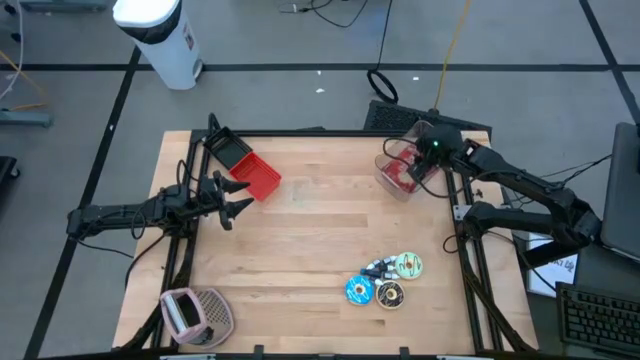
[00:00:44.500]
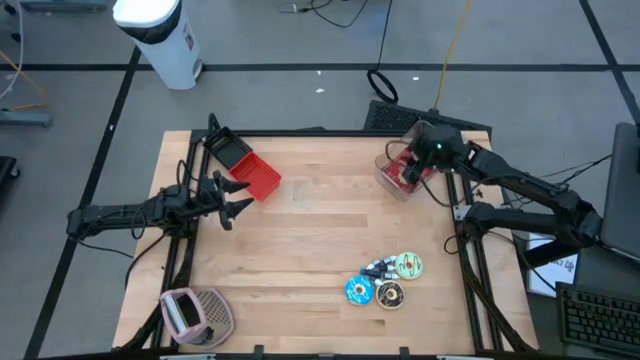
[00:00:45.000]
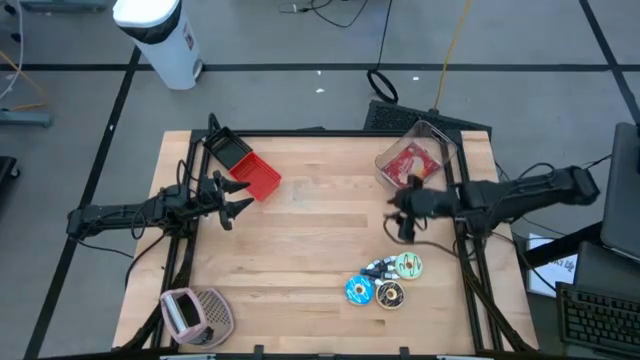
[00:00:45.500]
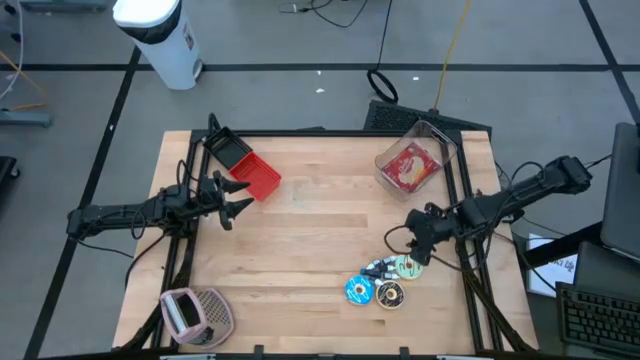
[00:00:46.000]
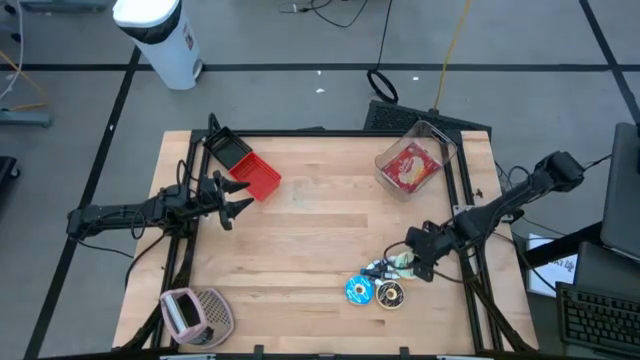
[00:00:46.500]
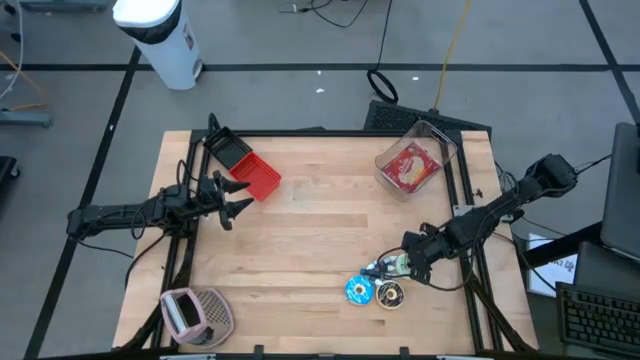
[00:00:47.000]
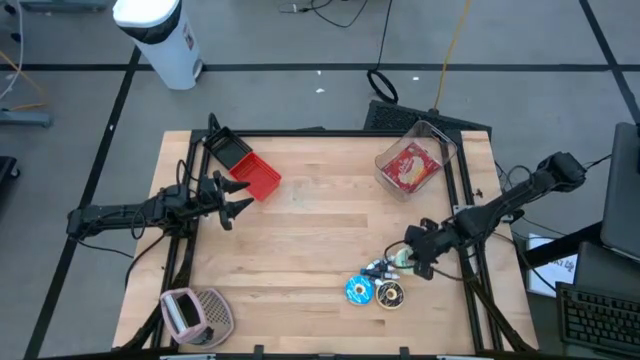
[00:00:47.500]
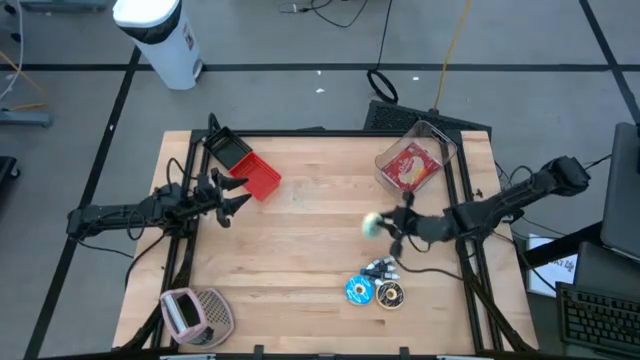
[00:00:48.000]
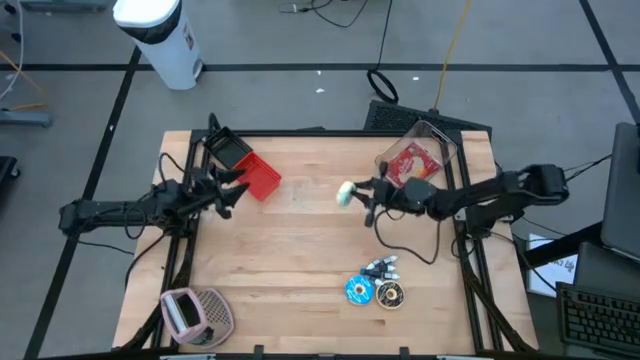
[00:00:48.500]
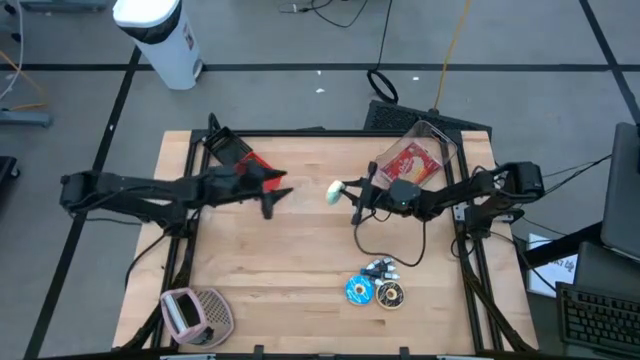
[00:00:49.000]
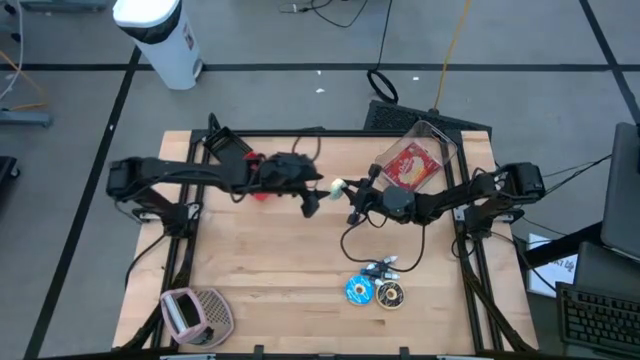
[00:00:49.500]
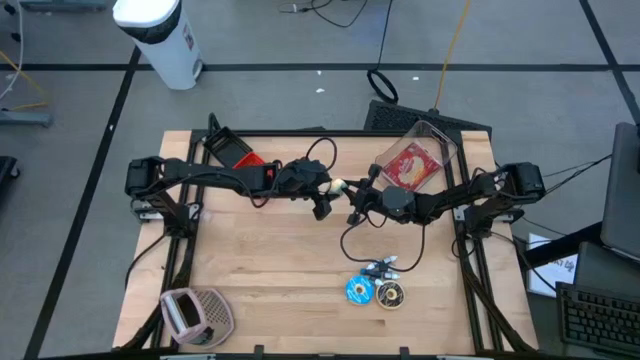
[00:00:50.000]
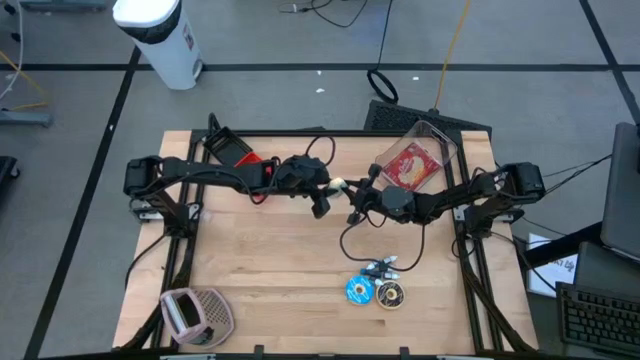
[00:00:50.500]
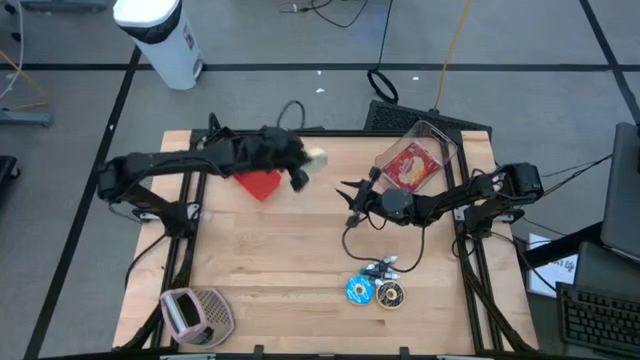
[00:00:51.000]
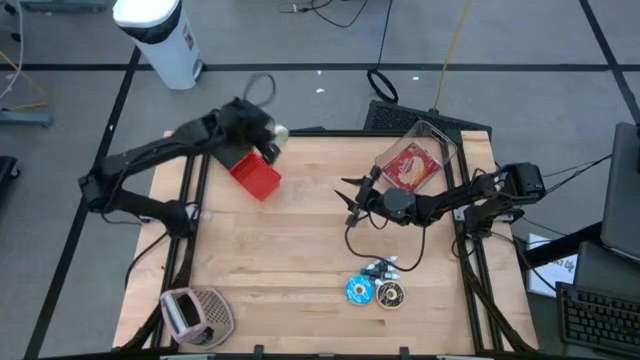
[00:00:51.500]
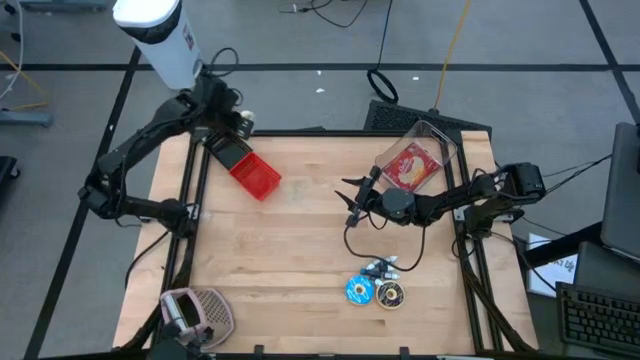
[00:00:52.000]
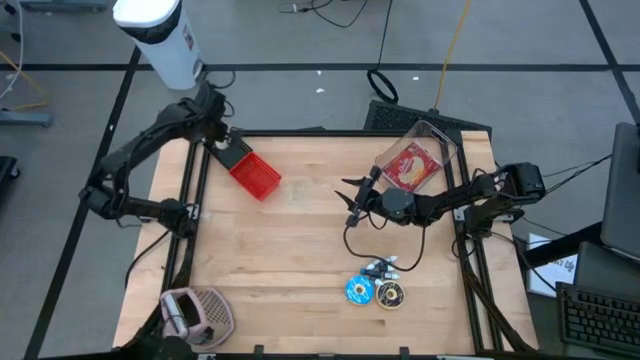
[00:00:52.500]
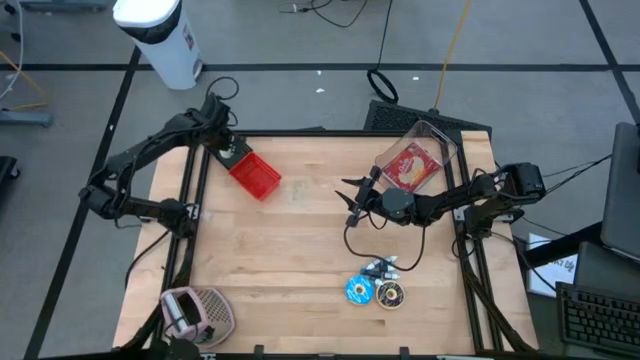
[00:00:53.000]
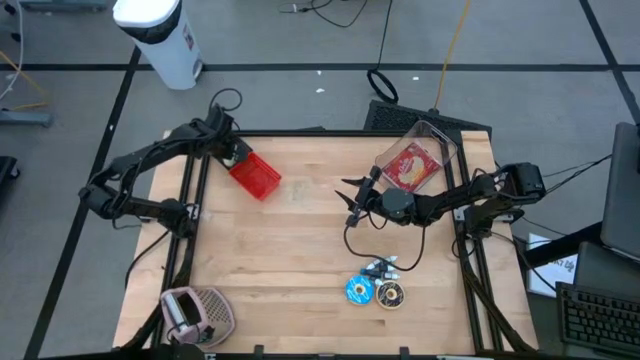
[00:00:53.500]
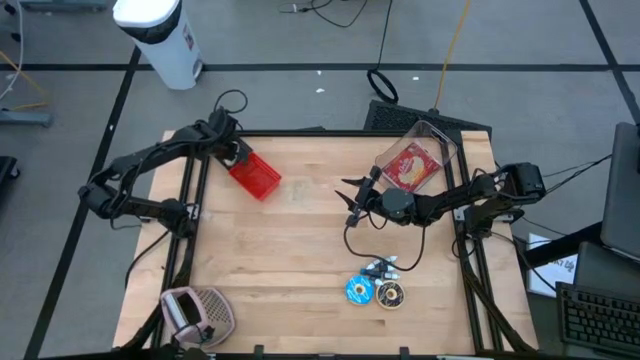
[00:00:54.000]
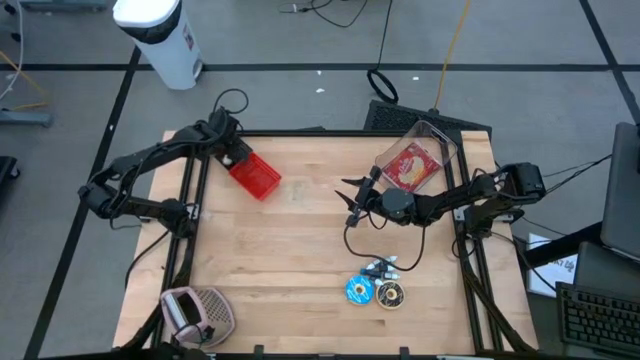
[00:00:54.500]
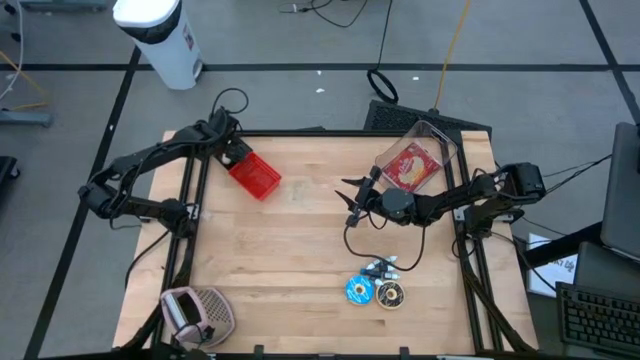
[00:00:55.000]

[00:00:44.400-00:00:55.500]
Put the green donut into the black bin

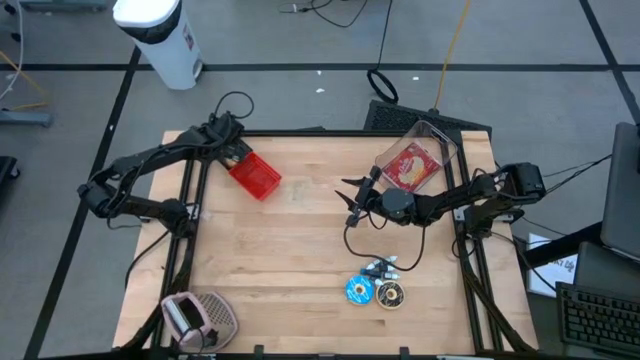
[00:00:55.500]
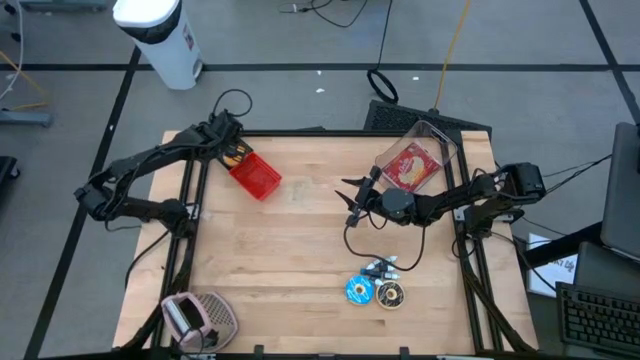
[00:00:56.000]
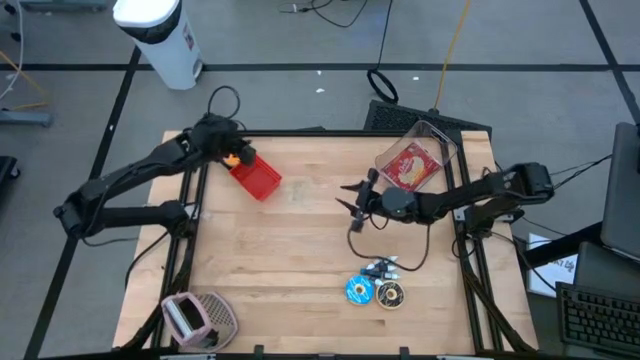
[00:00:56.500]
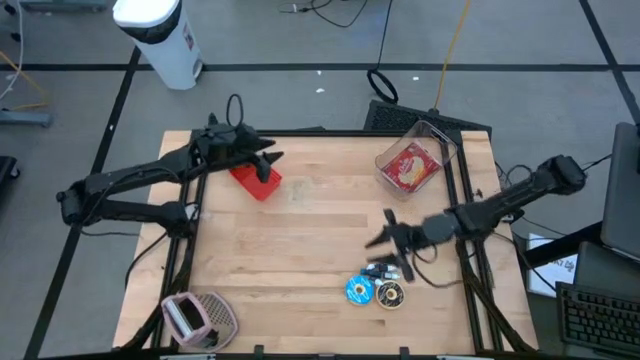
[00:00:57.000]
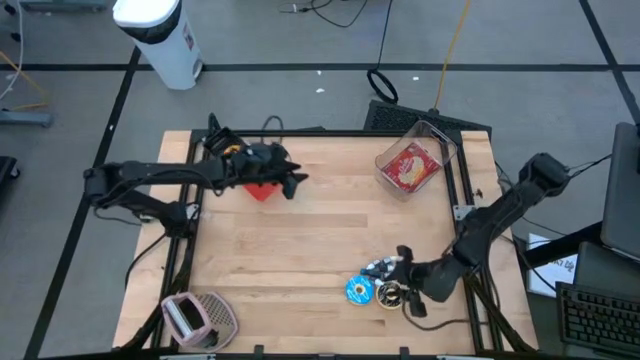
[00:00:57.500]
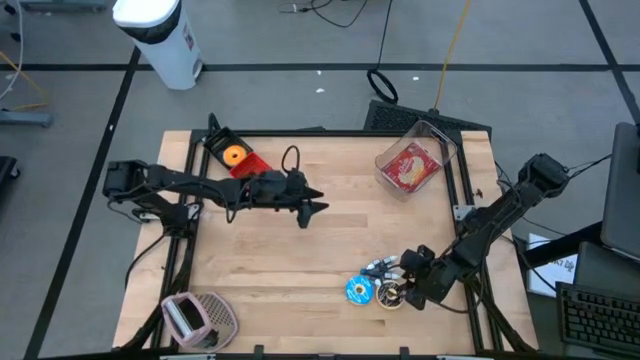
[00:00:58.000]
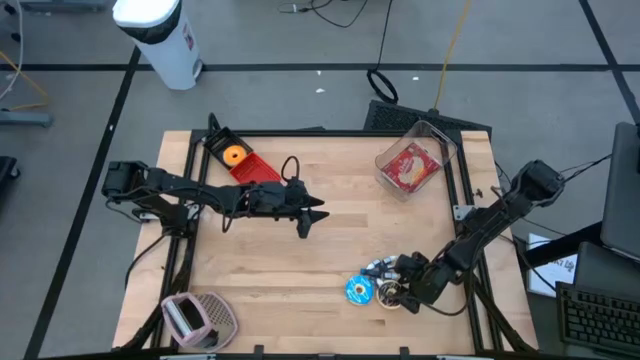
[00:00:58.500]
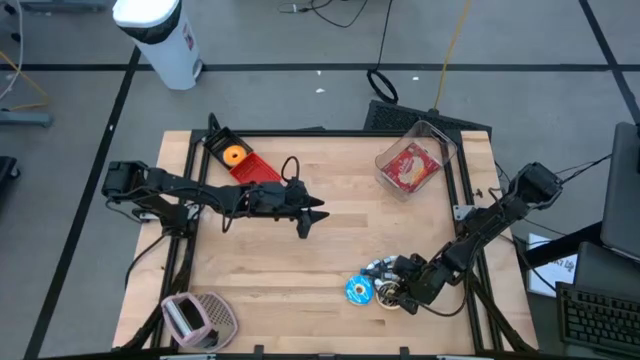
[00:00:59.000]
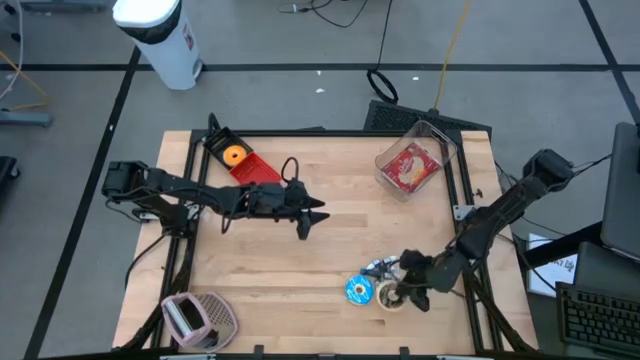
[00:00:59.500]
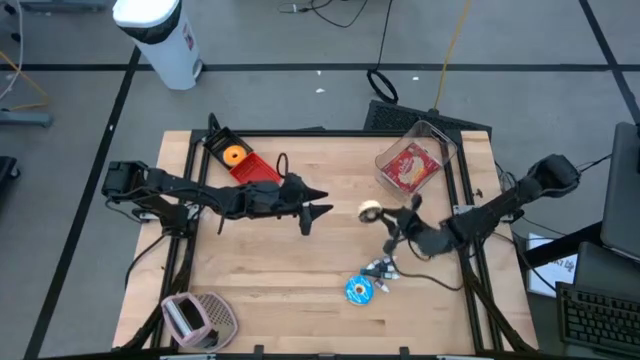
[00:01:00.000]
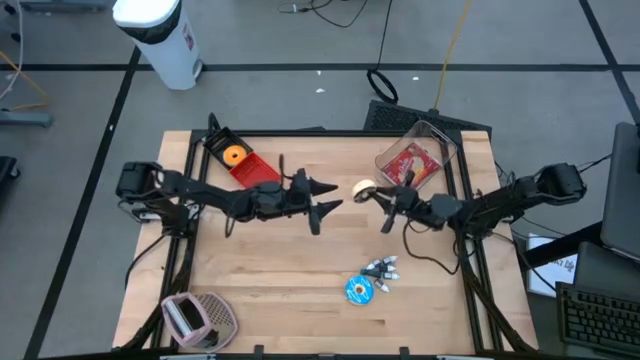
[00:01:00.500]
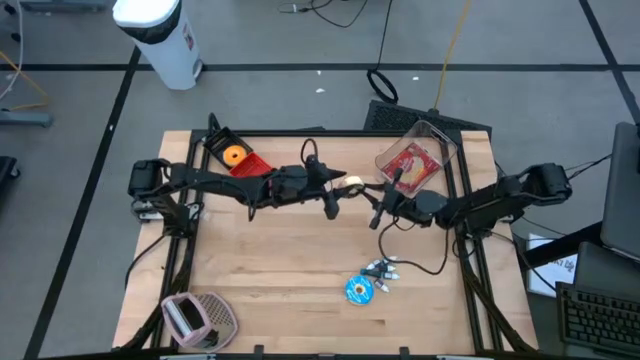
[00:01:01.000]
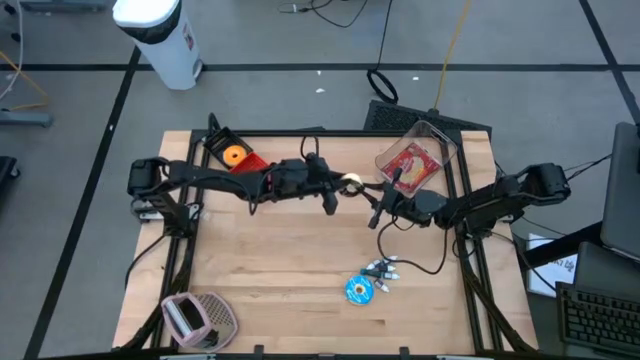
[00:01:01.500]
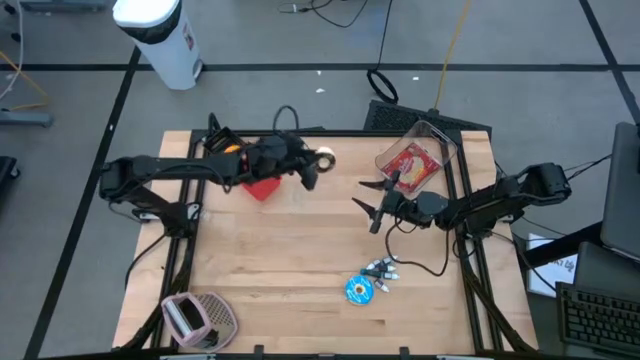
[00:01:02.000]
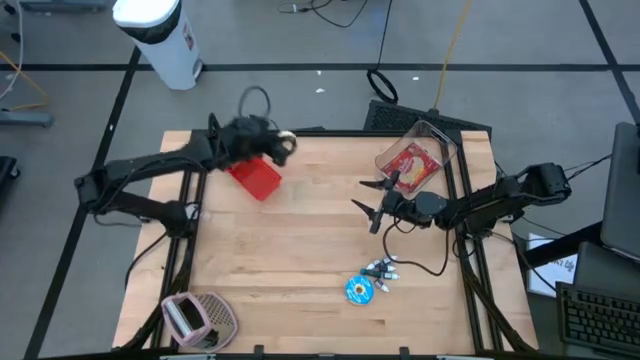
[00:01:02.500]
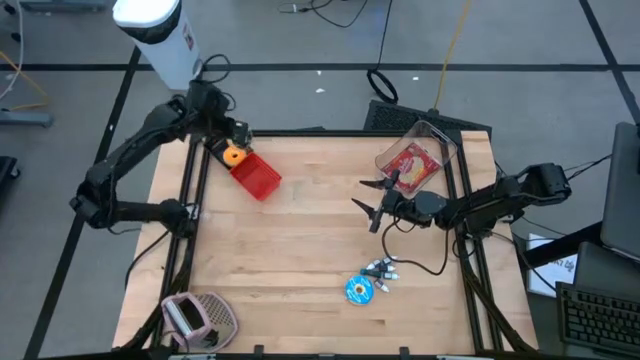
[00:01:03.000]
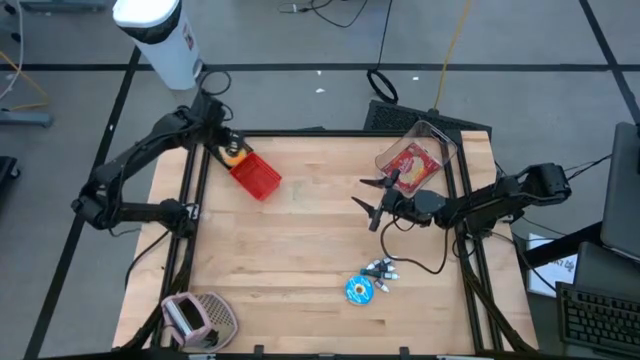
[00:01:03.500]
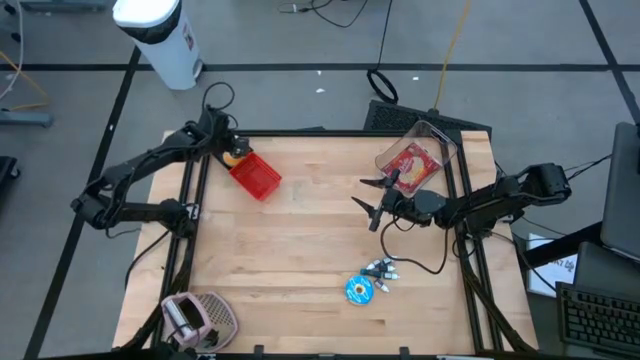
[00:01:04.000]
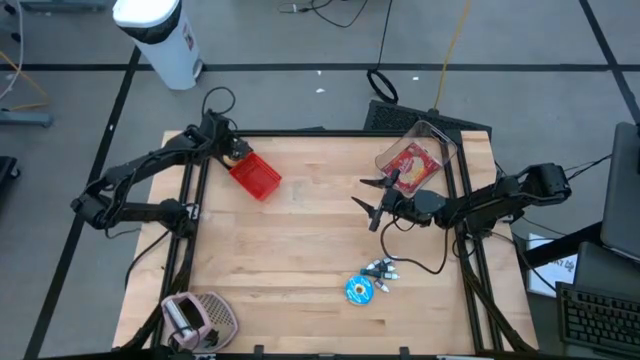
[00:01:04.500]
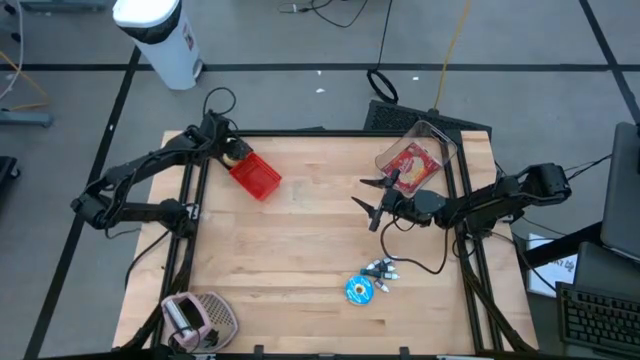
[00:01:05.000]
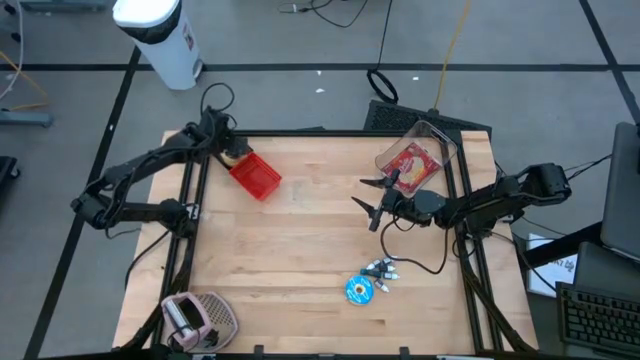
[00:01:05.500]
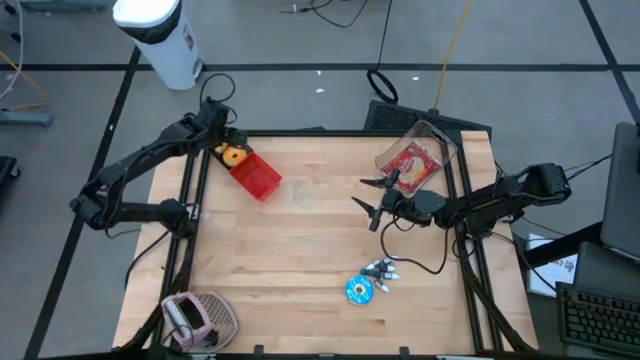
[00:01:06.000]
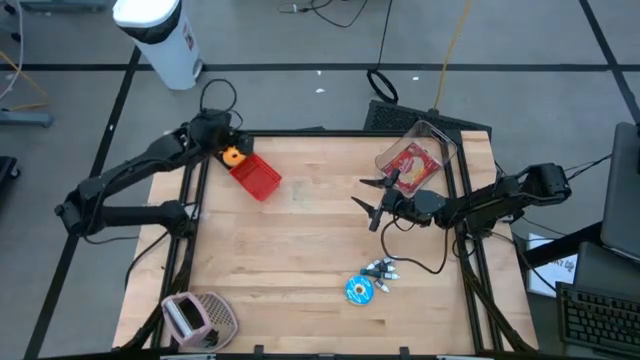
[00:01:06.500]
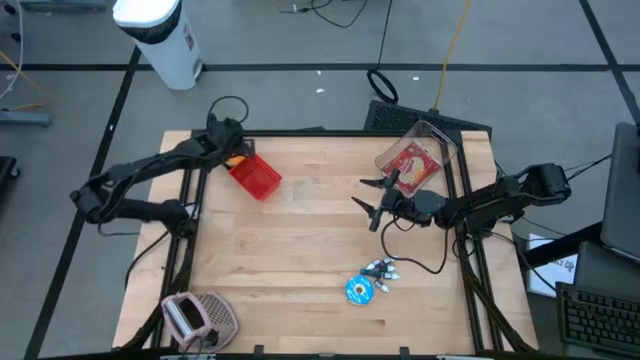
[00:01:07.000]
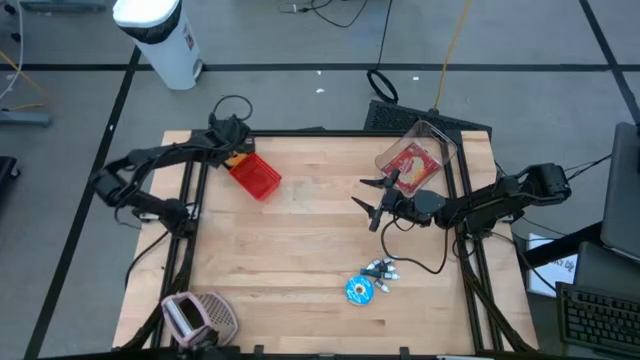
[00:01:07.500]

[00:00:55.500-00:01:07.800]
Put the black donut into the black bin
